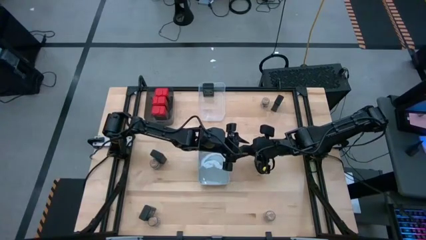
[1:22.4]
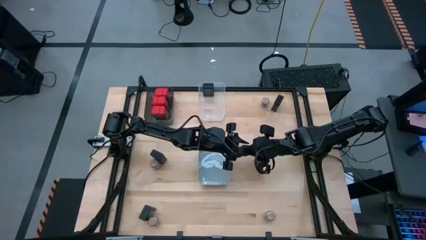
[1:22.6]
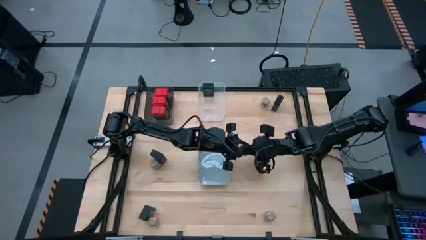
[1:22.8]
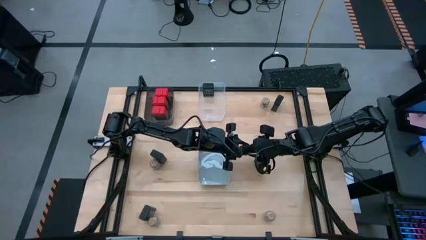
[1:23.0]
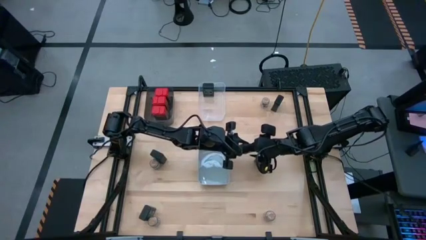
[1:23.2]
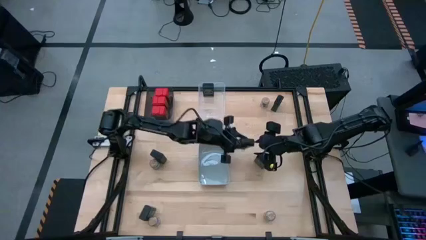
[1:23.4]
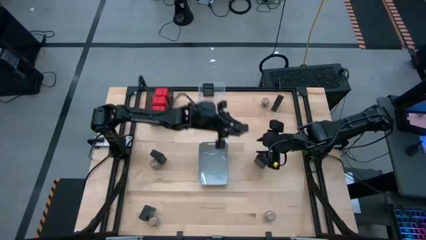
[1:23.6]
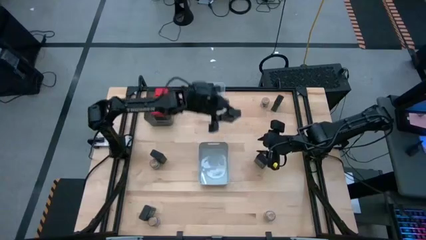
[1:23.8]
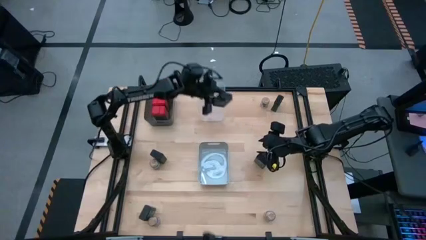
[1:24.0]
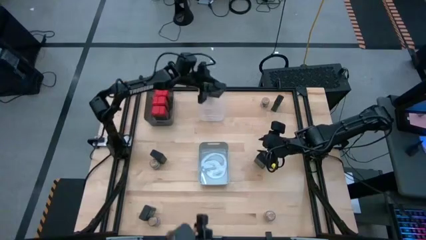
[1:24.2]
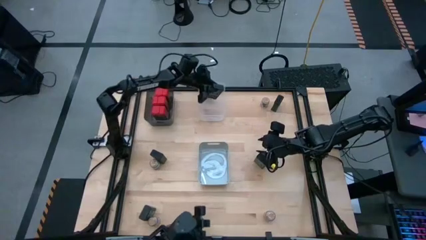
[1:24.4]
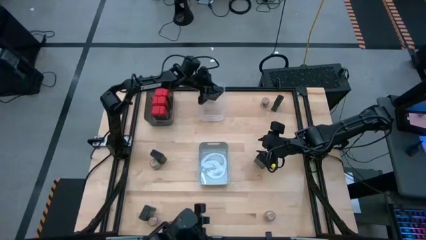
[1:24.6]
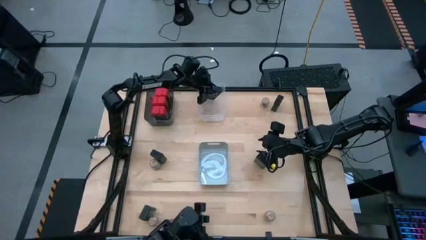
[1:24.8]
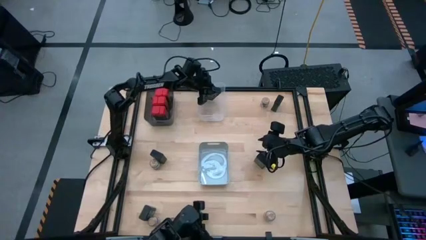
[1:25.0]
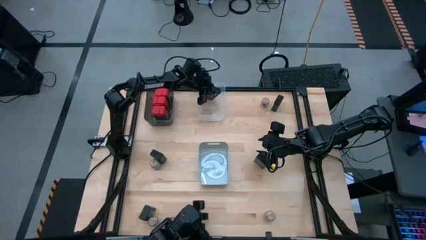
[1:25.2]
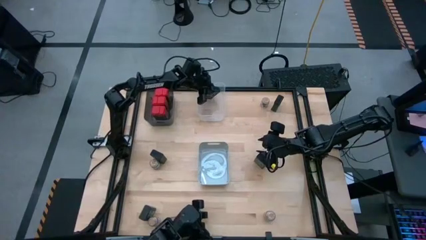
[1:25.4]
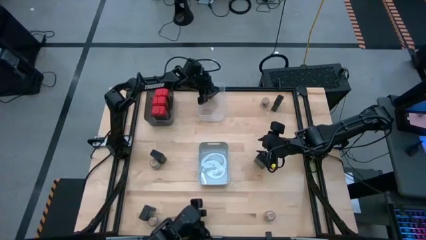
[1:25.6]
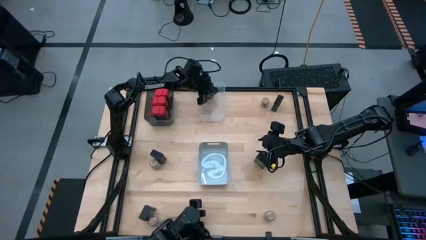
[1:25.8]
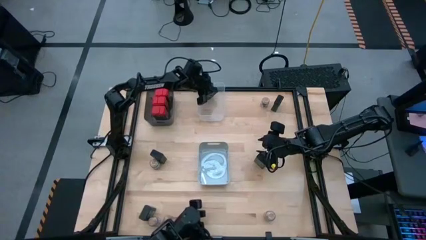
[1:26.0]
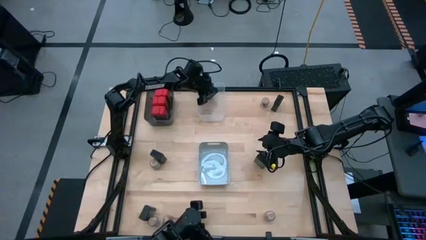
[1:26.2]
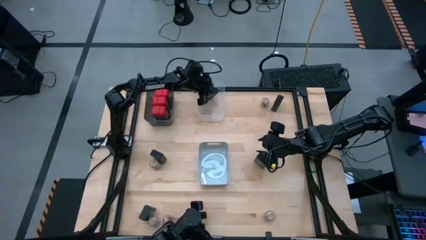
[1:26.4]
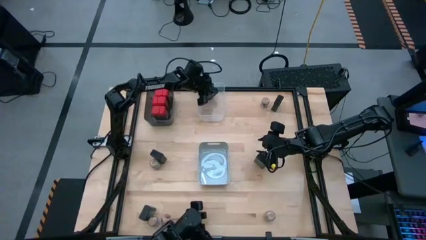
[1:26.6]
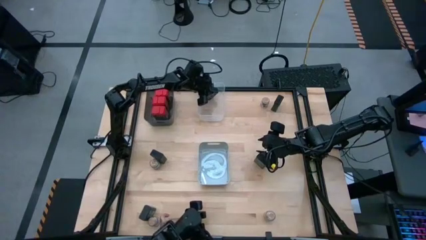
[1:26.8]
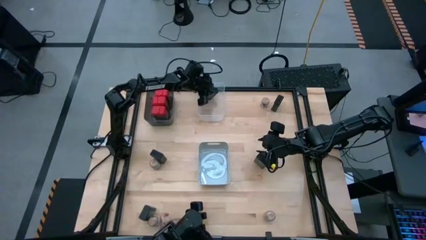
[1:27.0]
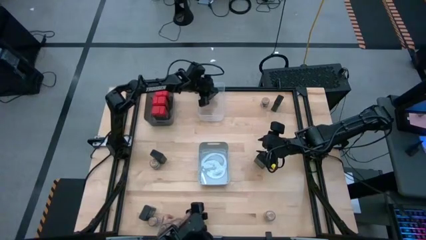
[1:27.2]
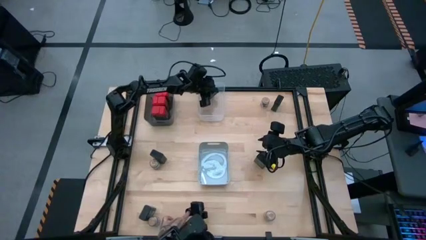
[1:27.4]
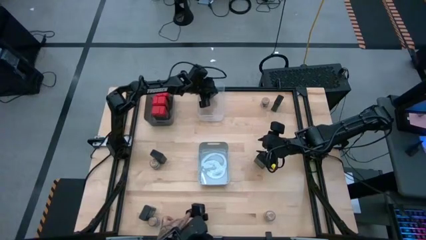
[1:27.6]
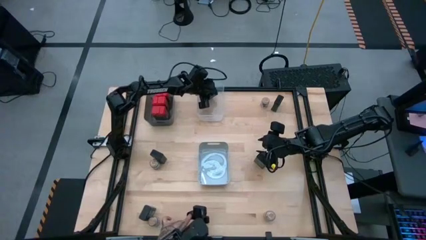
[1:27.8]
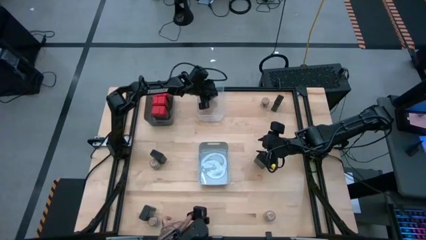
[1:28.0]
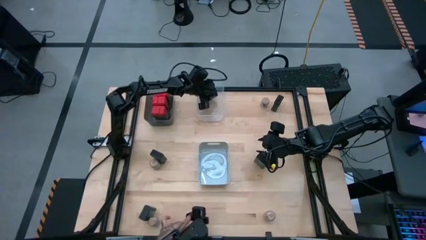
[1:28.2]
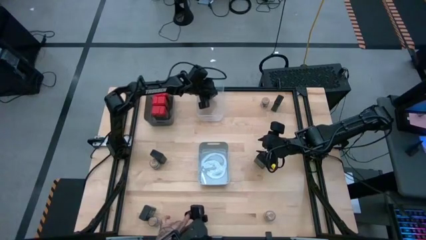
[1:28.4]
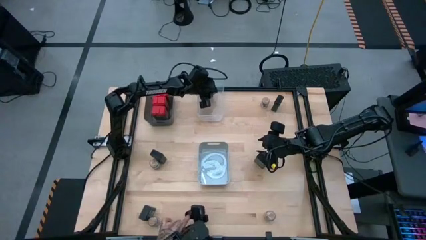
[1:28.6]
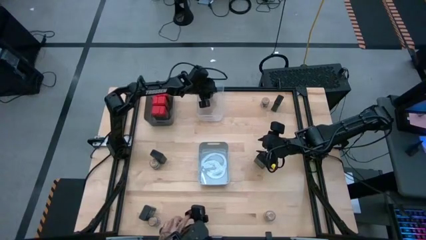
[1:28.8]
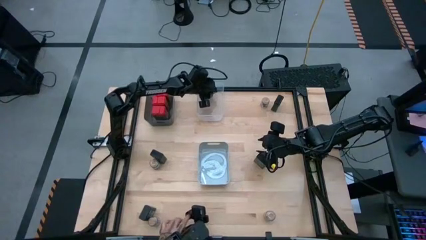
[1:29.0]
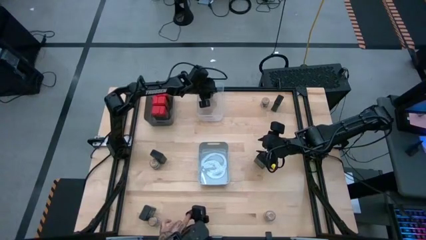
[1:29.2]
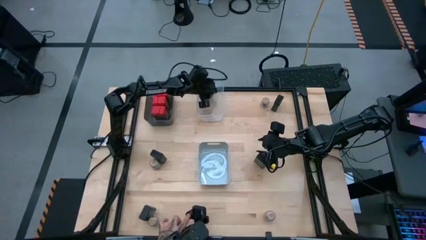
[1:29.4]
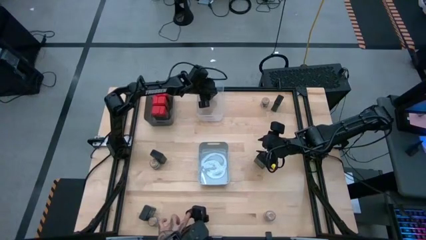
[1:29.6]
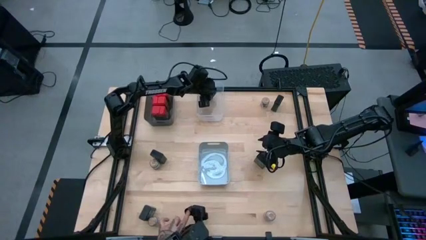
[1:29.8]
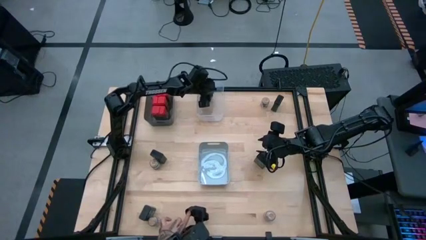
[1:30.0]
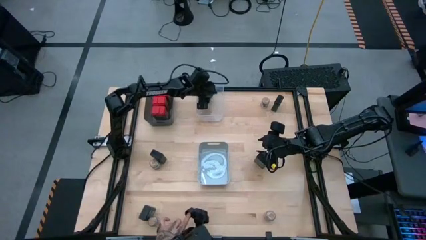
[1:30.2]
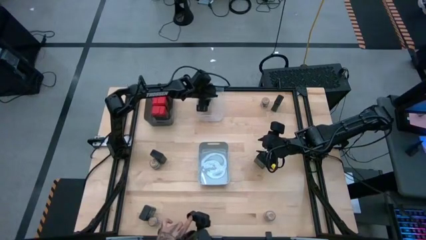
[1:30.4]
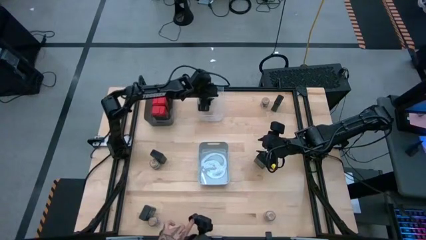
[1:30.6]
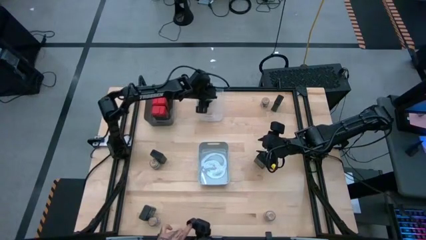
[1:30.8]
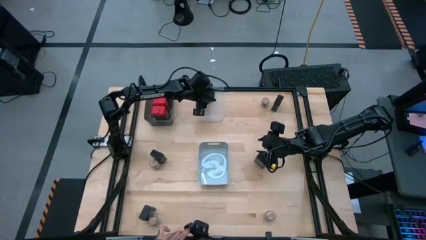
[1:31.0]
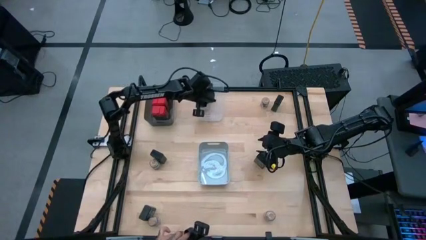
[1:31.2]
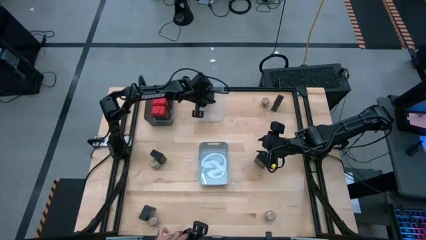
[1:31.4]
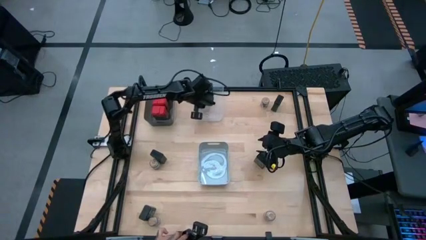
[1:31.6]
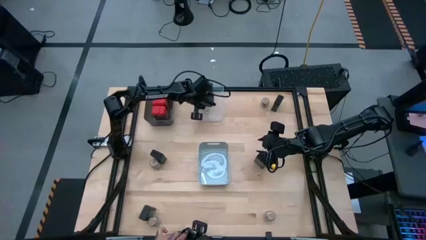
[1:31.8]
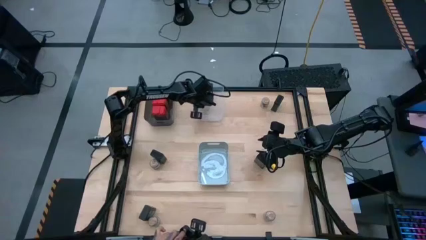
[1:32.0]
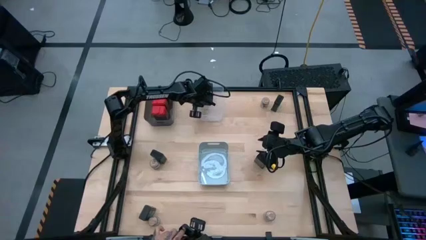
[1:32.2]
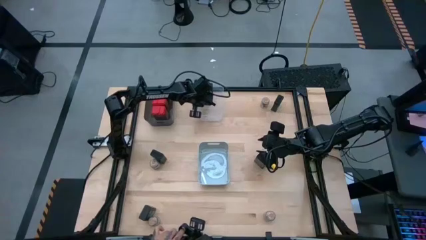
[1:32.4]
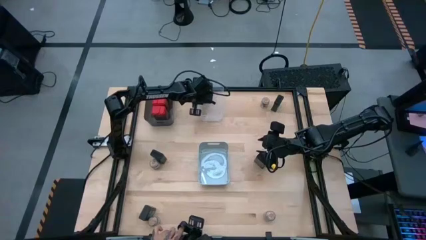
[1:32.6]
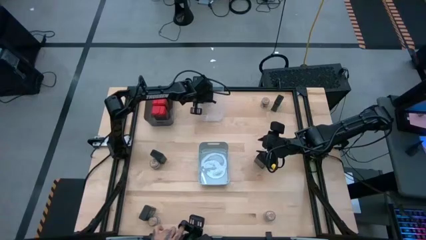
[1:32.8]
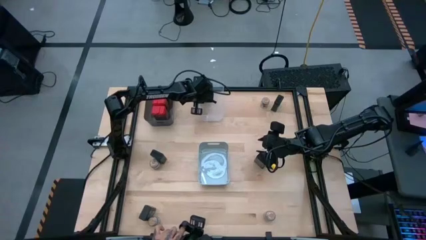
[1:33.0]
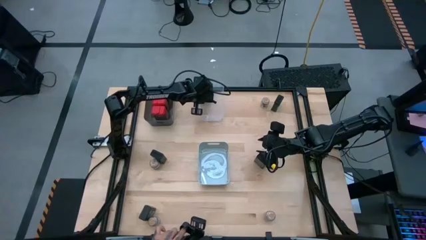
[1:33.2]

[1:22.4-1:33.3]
Task: Sort spices by type
Put the black seasoning can into the transparent bin

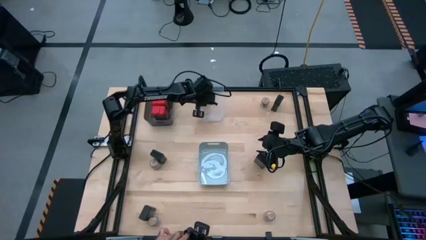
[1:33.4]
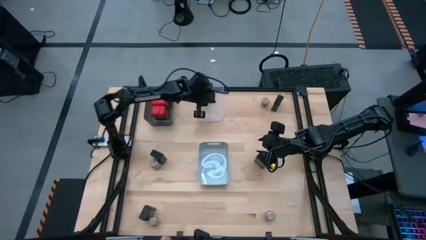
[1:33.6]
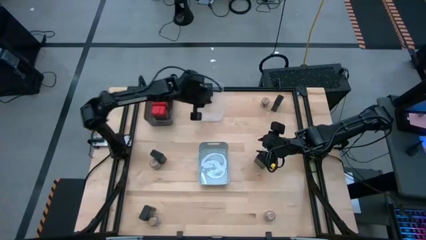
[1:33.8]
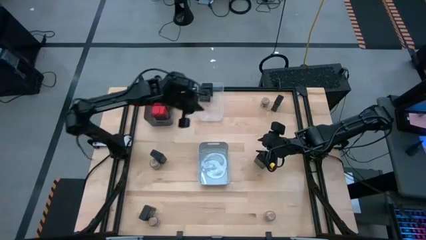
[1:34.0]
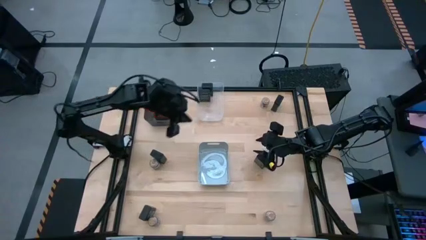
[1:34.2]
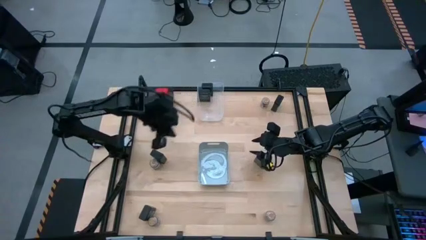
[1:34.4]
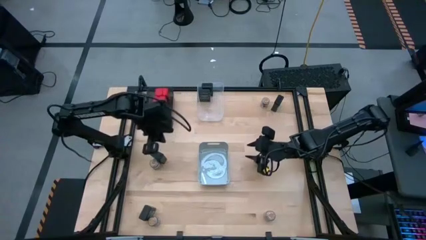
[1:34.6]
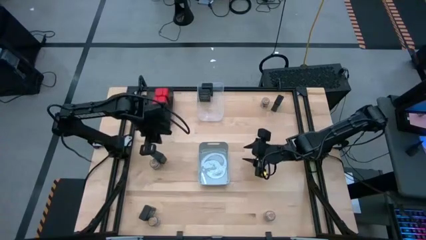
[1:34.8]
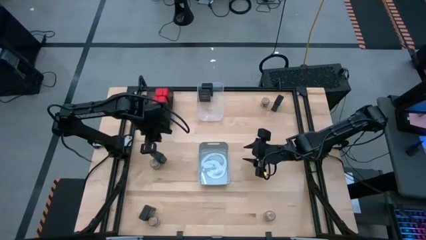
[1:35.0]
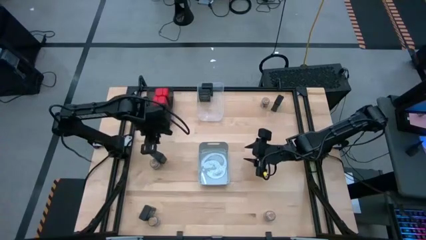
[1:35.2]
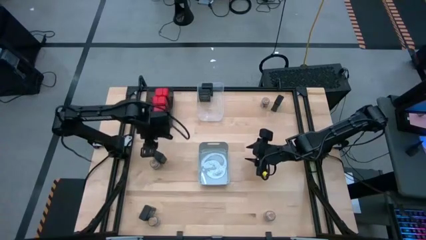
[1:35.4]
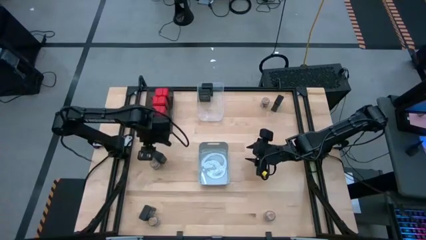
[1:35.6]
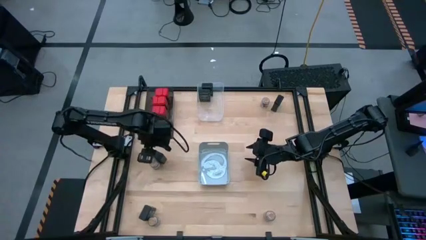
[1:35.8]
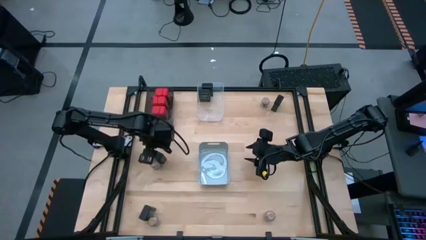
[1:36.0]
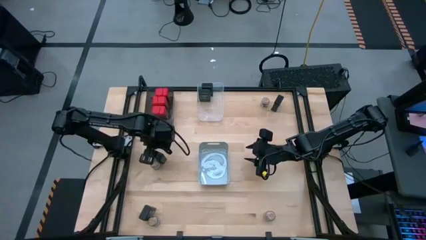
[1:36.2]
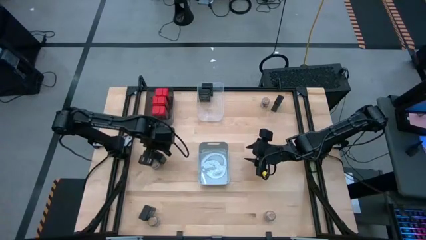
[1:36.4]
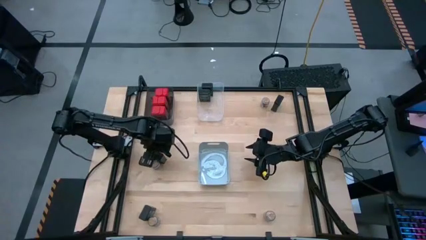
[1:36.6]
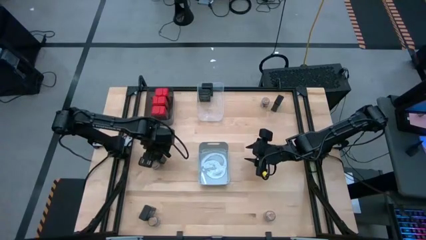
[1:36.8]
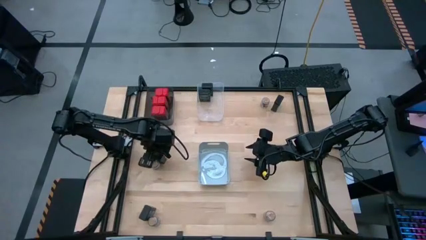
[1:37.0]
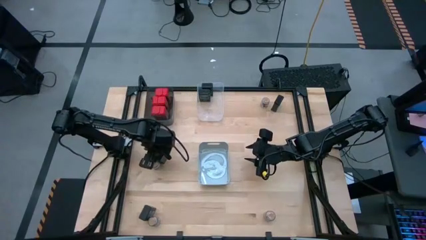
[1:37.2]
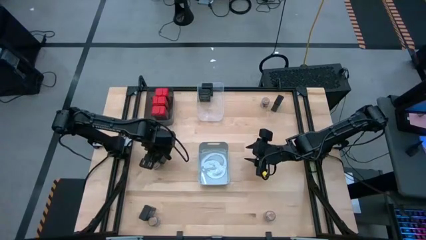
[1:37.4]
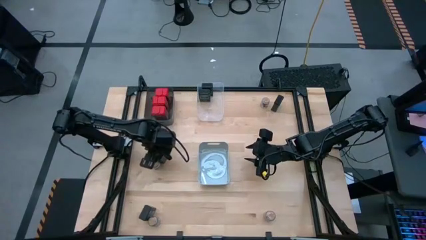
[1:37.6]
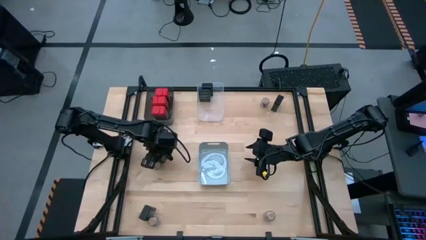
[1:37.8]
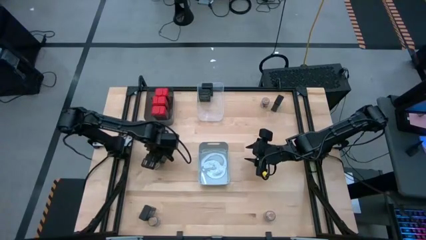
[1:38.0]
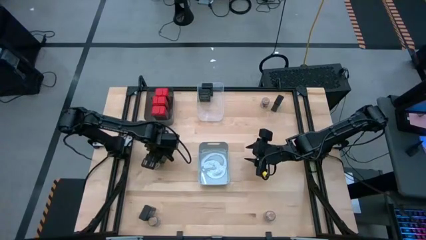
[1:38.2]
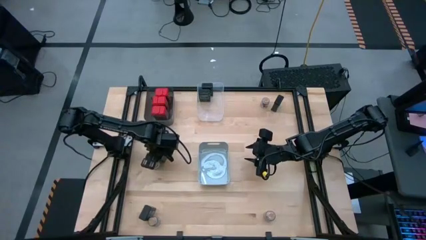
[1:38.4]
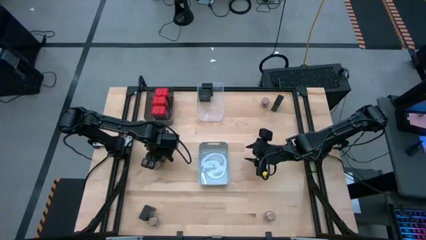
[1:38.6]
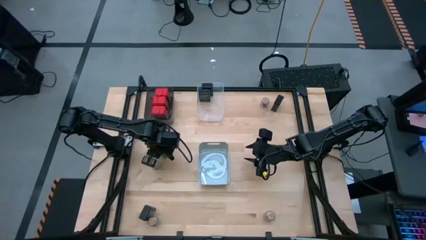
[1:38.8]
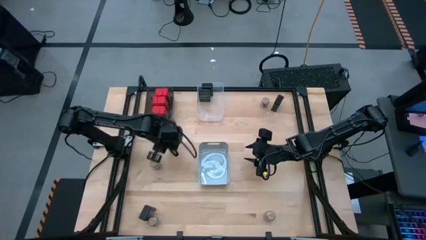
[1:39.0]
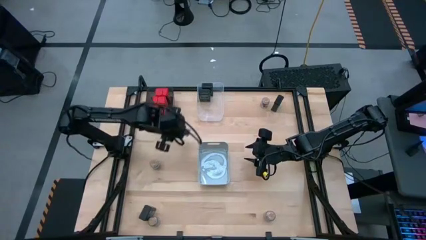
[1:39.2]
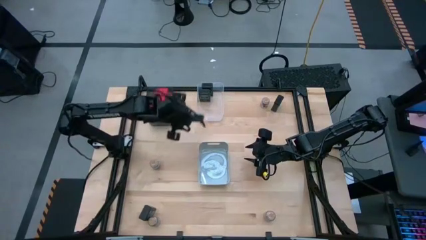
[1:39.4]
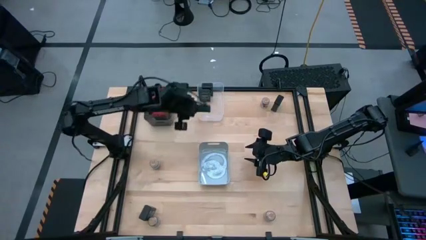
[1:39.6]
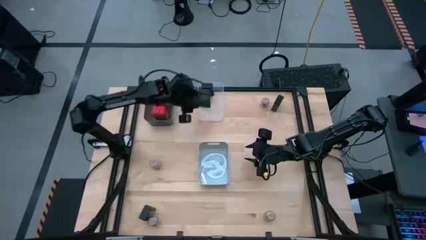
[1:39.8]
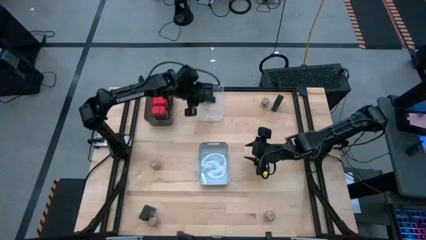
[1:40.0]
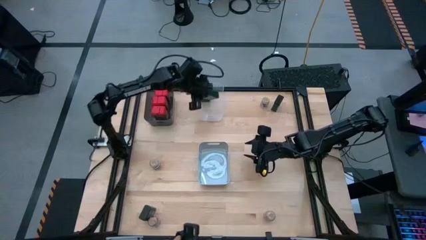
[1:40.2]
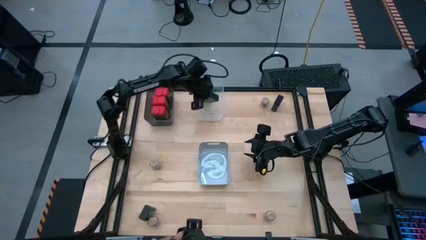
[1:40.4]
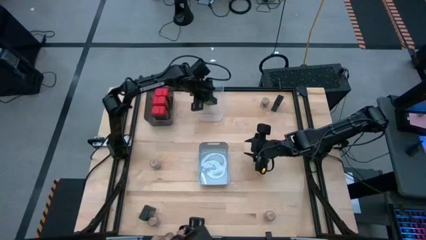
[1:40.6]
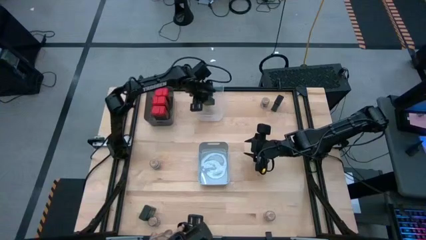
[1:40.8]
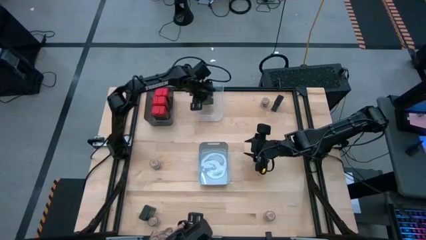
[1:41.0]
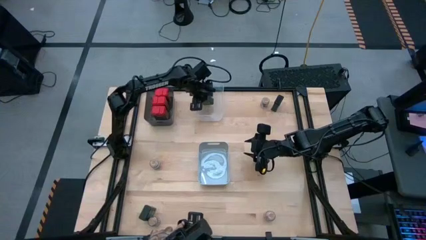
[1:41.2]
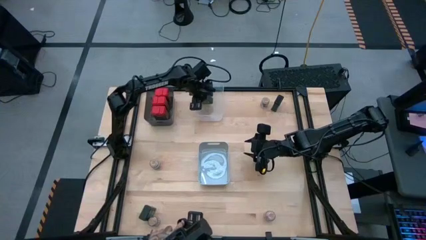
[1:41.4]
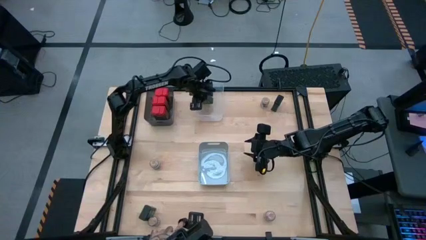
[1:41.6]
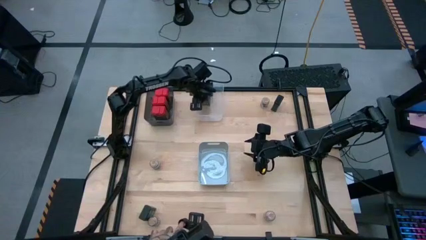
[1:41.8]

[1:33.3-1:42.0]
Put the black seasoning can into the transparent bin
